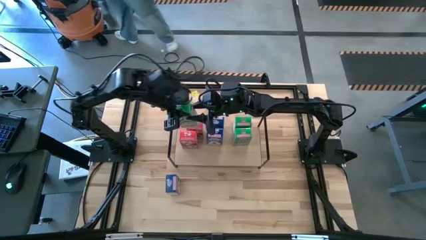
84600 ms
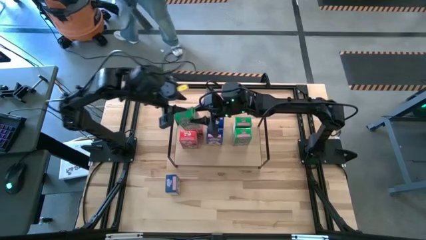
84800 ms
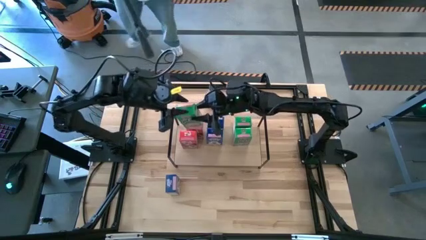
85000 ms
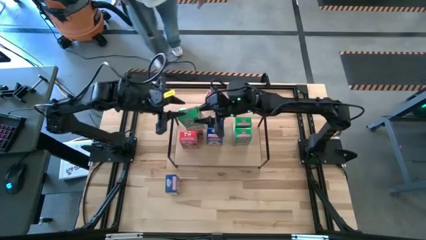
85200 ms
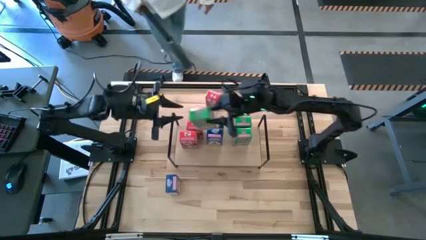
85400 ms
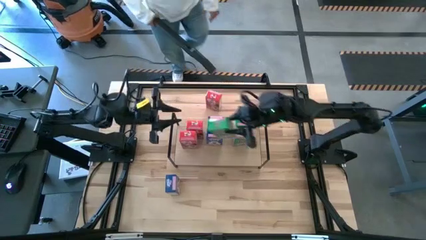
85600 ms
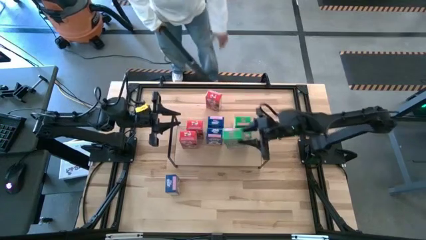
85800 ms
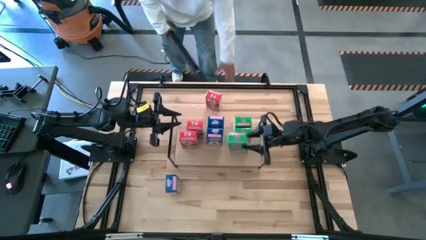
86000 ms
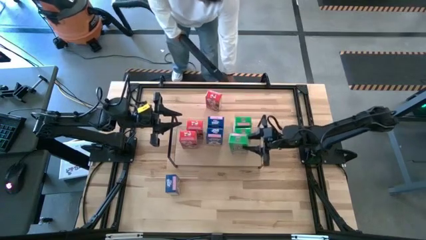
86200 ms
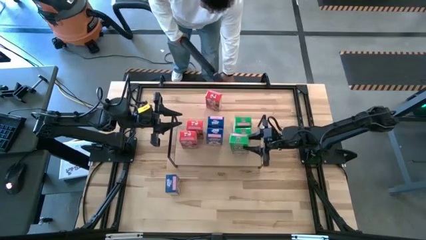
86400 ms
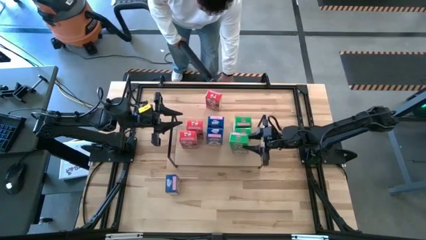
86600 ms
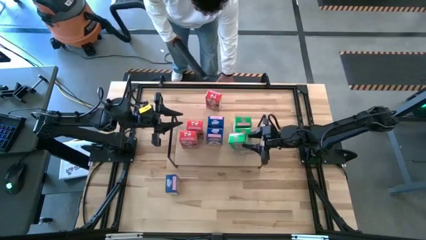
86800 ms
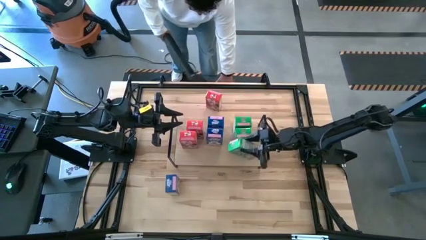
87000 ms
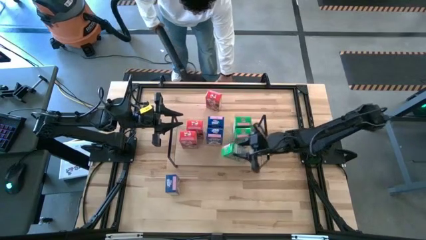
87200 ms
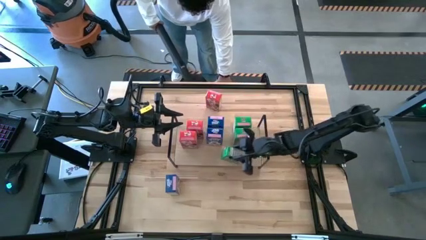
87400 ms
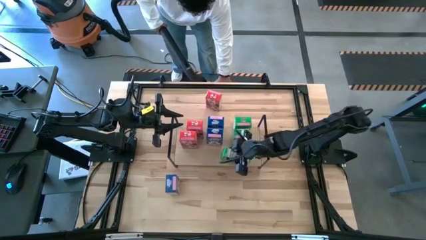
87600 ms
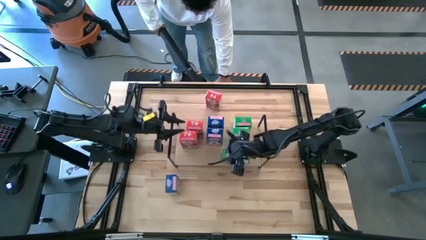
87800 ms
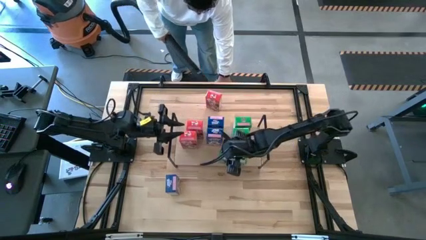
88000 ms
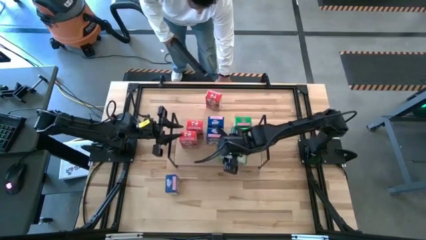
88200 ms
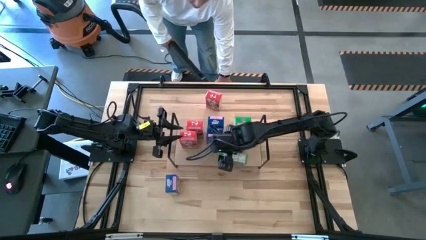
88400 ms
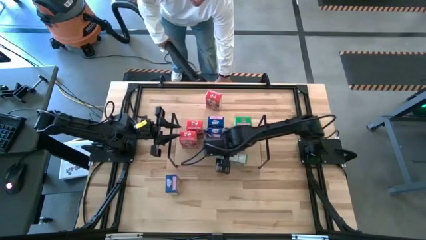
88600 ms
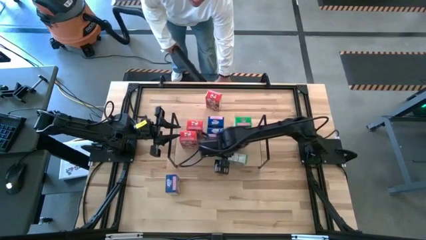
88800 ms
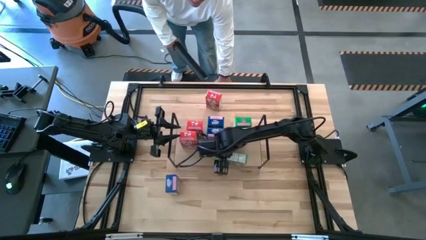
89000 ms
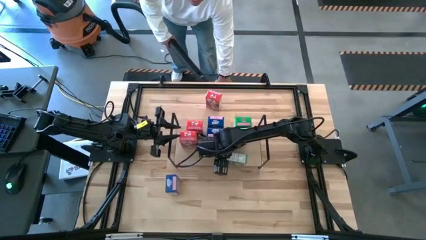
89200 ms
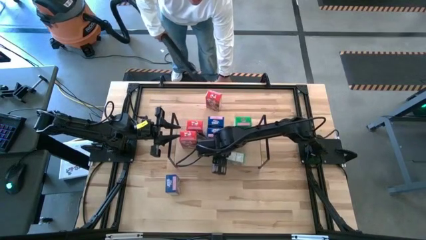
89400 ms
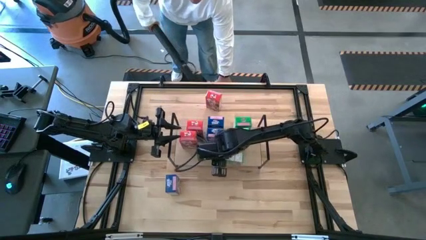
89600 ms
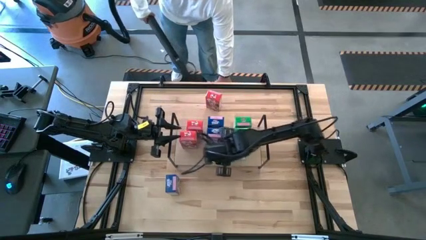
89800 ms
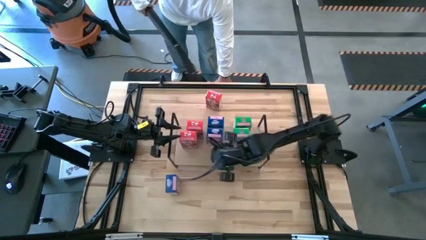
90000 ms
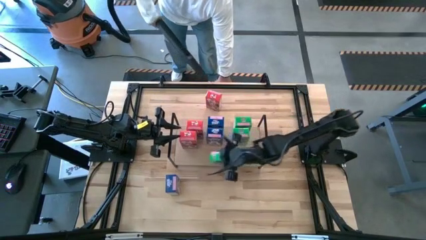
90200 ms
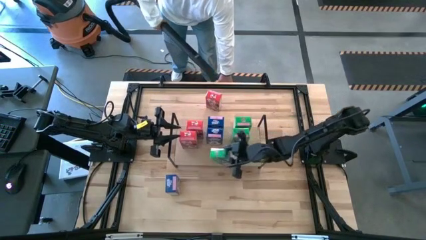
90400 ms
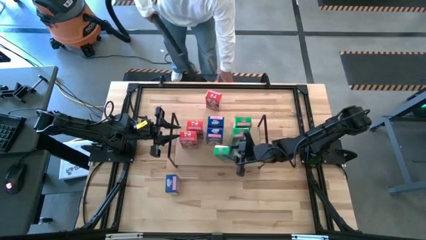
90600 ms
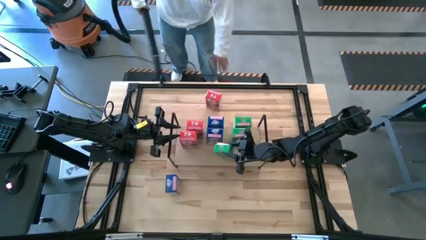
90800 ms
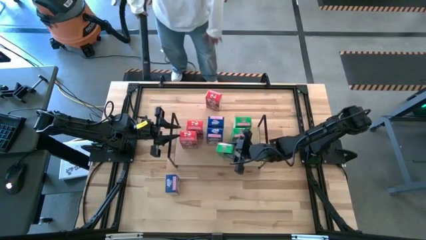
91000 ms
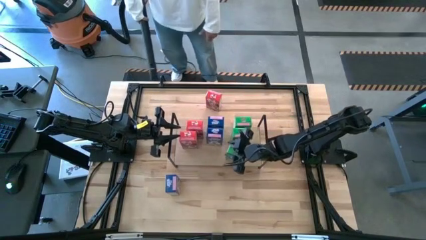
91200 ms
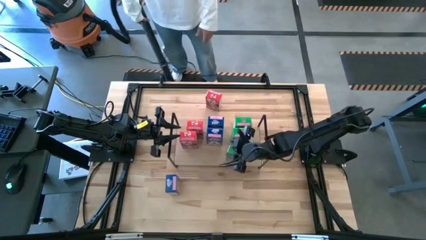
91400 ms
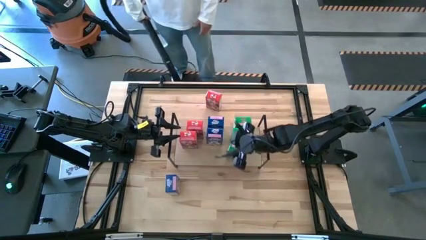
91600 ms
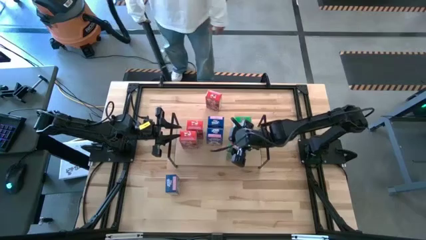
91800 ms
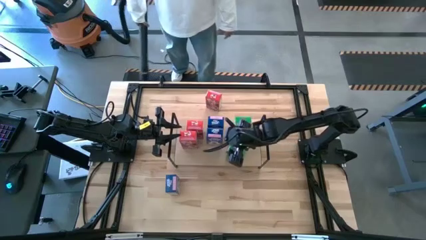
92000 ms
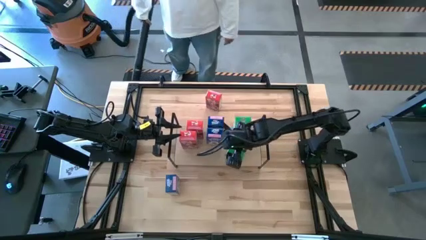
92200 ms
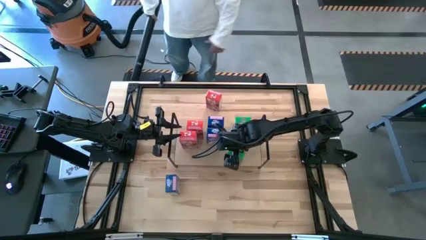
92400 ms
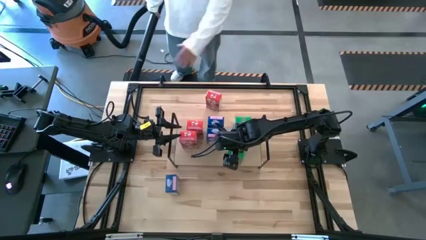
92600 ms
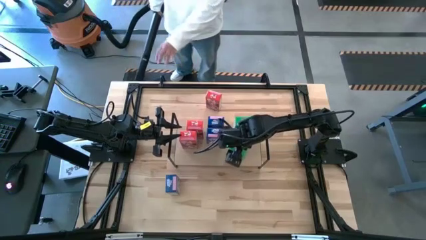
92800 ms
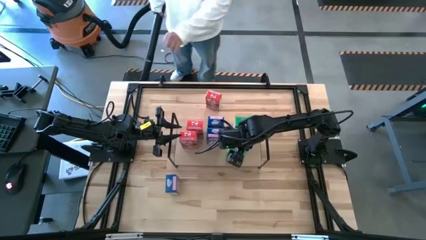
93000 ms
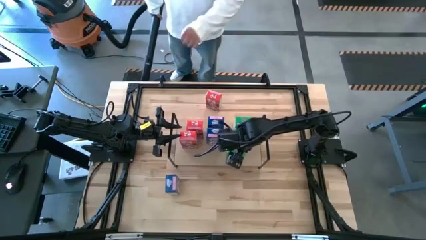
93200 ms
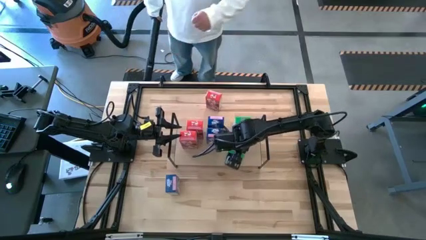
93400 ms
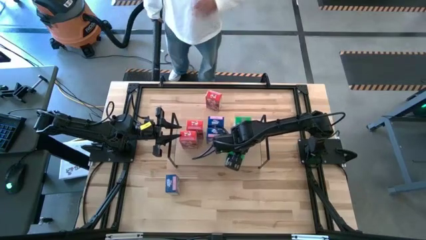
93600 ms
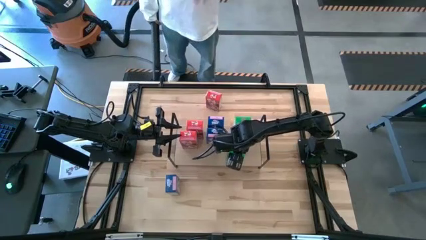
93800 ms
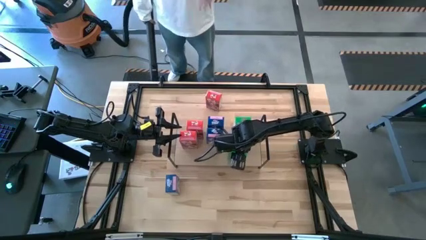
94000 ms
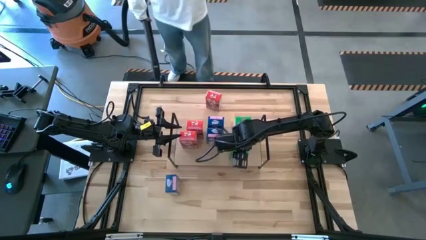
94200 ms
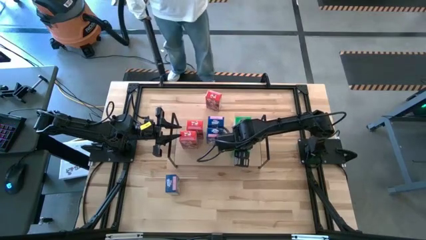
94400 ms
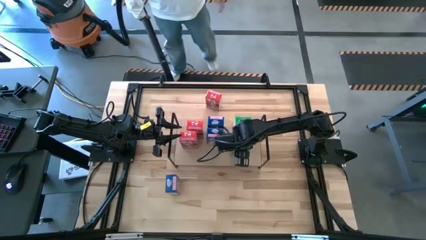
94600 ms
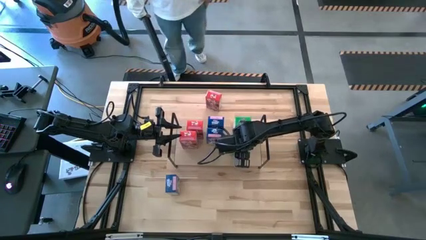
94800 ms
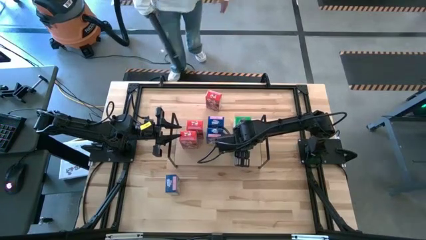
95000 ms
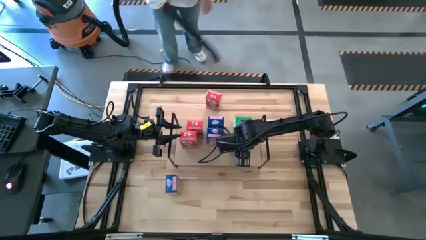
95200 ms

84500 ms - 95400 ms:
Task: Stack cereal on shelf
Put the green cereal box on the shelf aligned with the other green cereal boxes

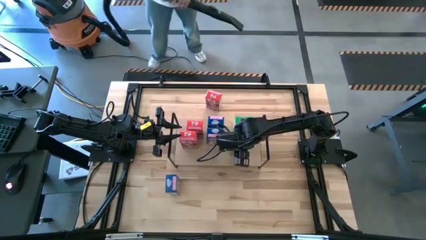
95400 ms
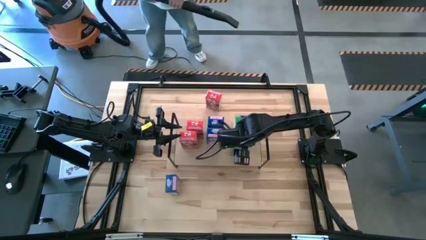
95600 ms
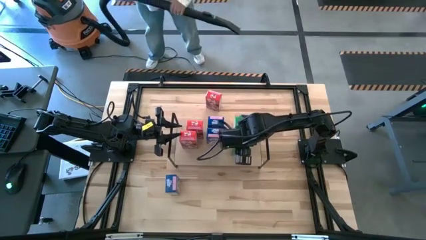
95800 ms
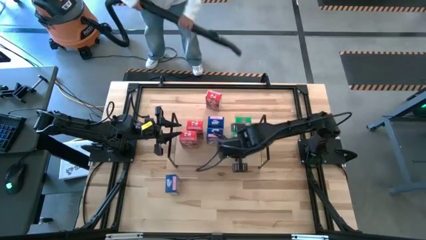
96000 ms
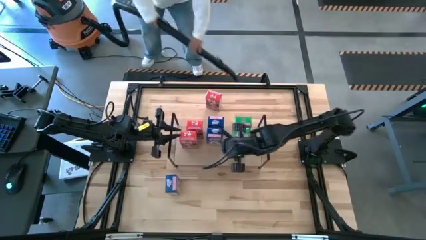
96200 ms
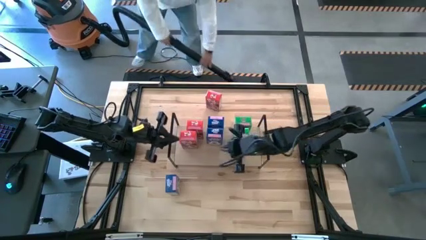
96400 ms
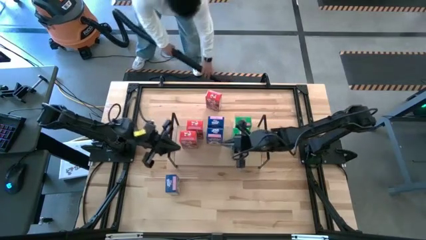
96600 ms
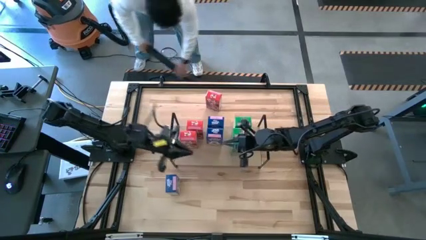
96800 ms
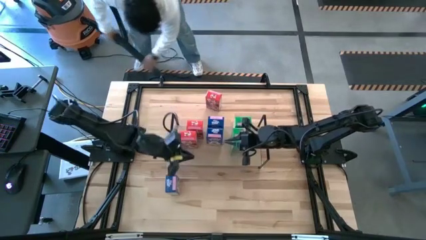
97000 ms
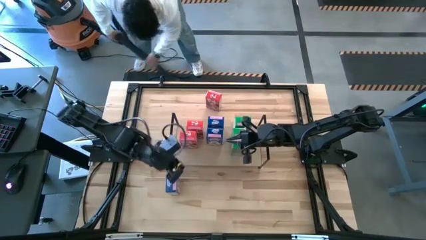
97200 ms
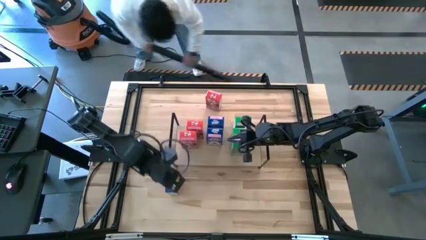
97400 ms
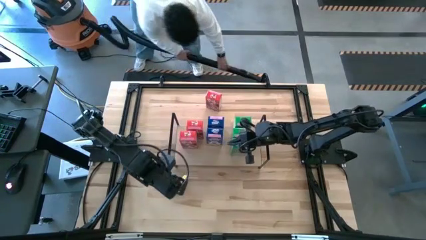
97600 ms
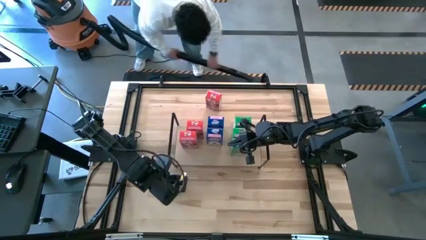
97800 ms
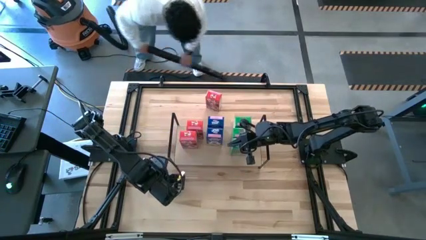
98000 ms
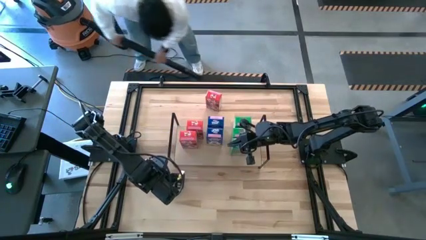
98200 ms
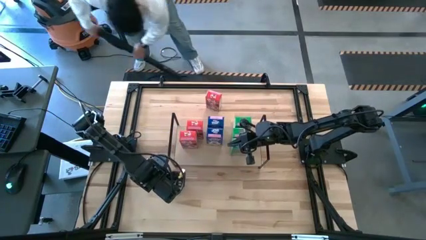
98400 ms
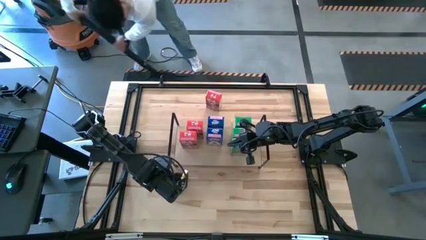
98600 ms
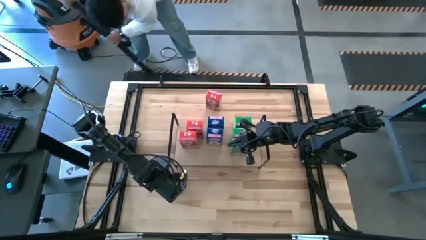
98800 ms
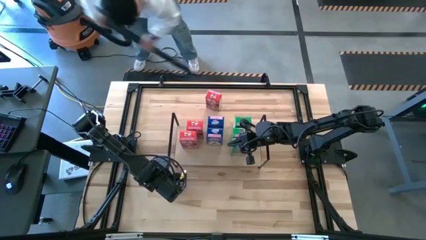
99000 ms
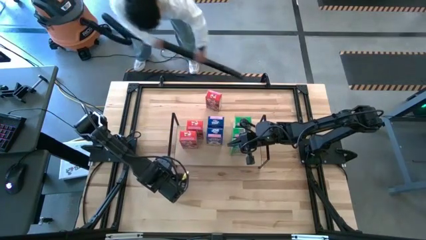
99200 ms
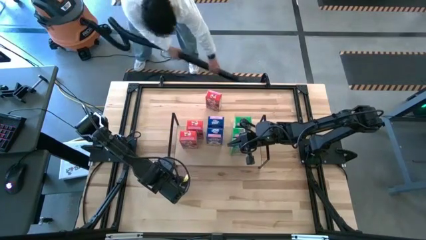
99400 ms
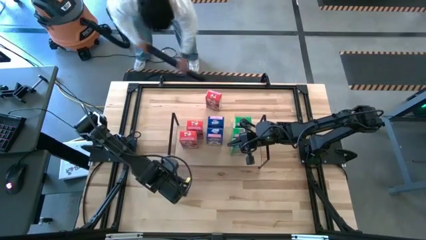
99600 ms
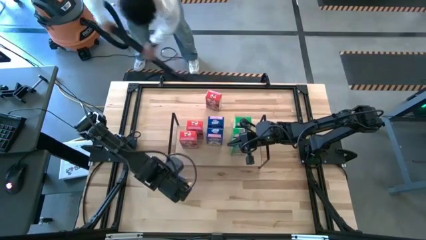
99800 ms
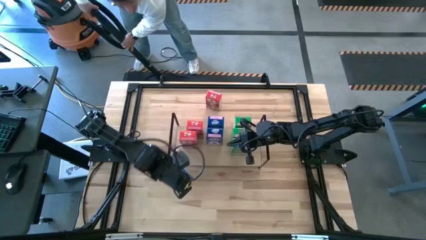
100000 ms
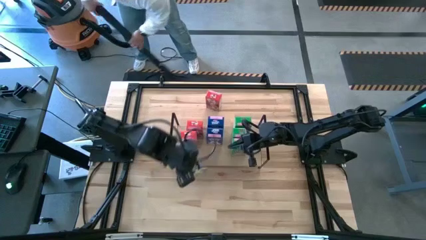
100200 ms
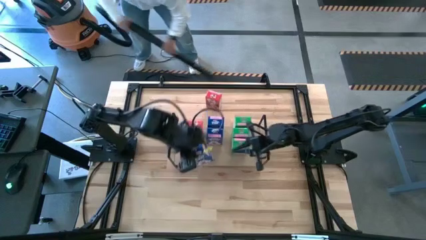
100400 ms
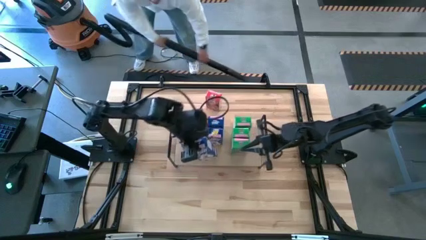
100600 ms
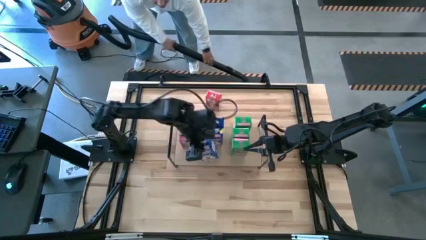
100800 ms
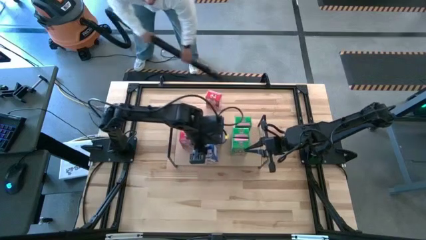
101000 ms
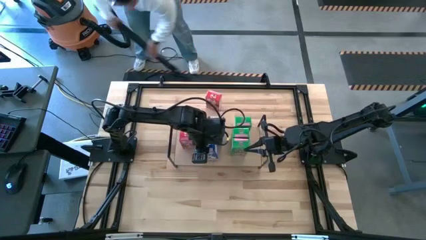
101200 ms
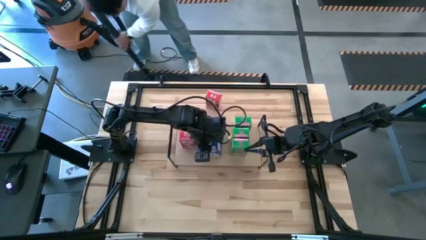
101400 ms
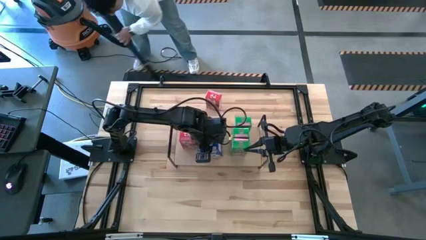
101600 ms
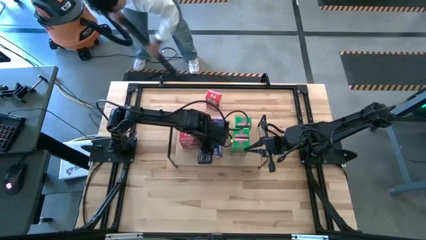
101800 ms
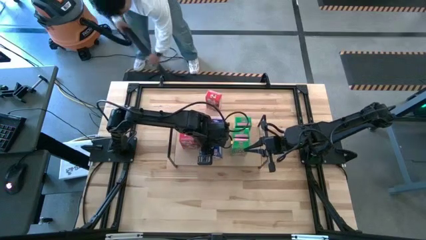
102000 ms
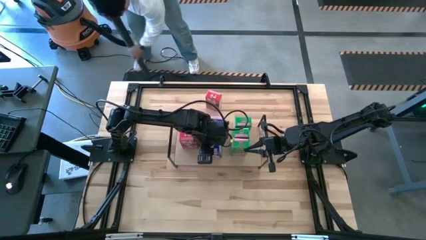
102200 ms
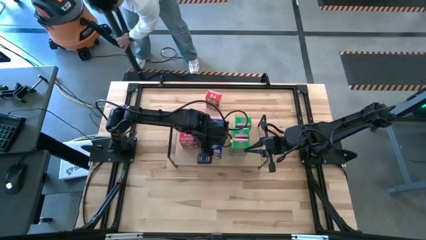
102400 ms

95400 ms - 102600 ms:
Put the blue cereal box on the shelf aligned with the other blue cereal boxes
